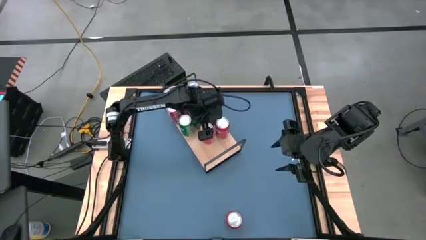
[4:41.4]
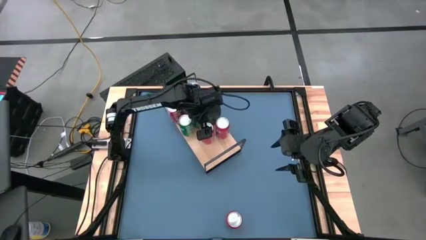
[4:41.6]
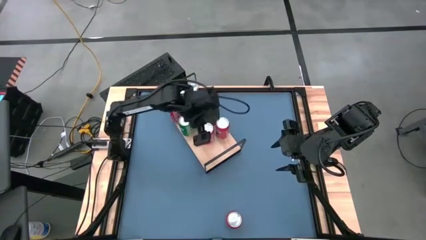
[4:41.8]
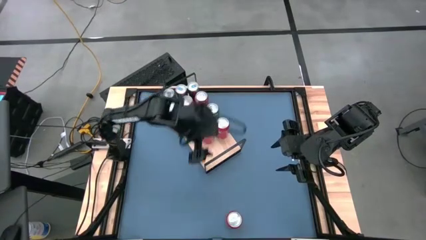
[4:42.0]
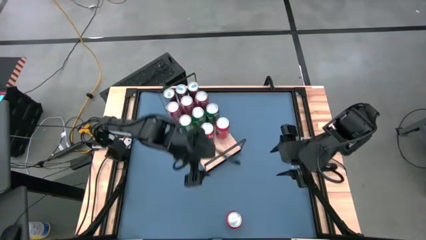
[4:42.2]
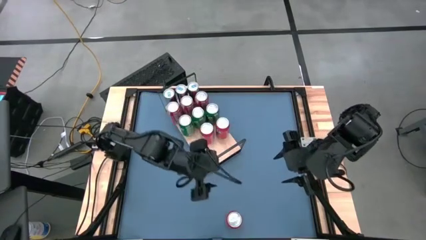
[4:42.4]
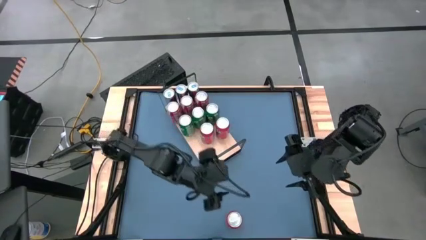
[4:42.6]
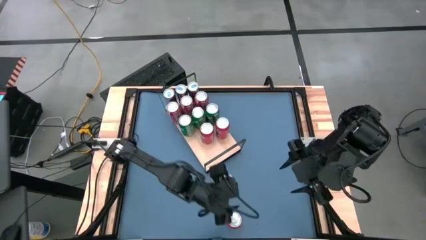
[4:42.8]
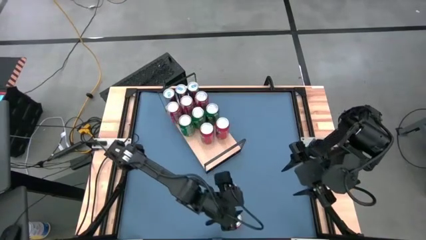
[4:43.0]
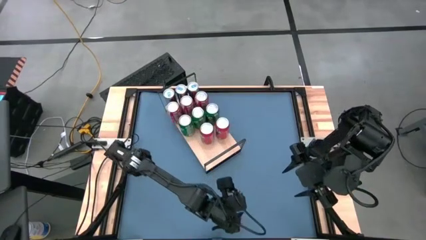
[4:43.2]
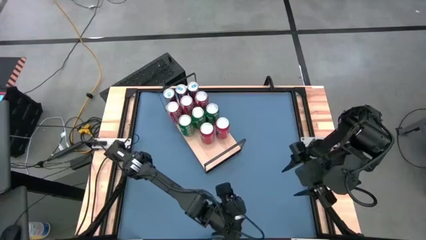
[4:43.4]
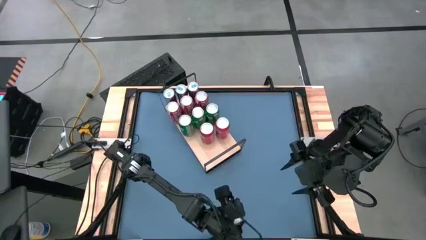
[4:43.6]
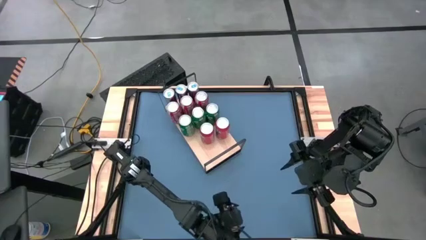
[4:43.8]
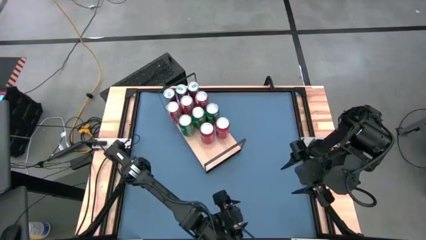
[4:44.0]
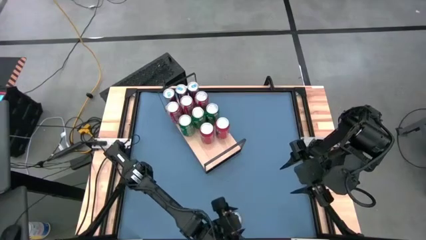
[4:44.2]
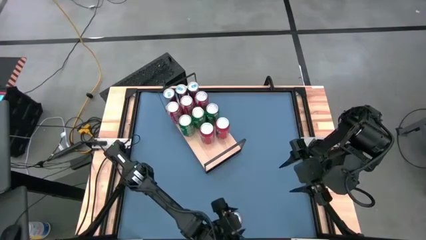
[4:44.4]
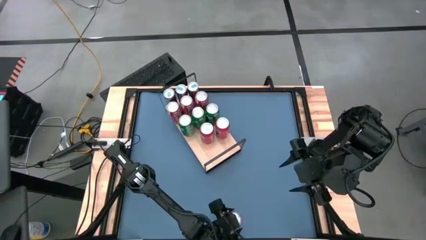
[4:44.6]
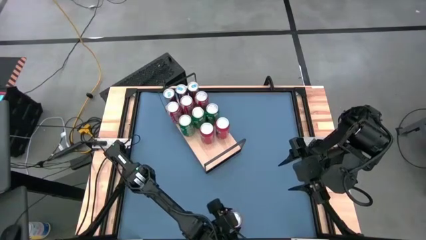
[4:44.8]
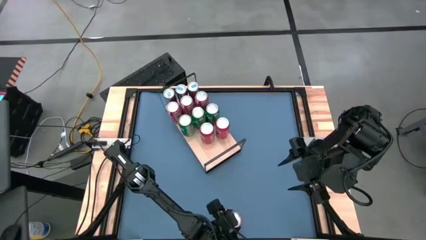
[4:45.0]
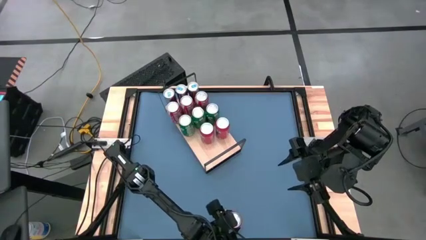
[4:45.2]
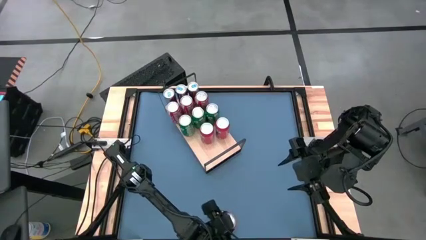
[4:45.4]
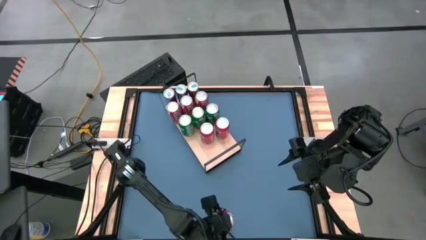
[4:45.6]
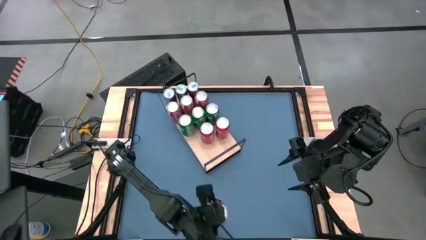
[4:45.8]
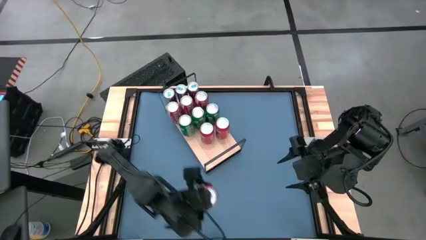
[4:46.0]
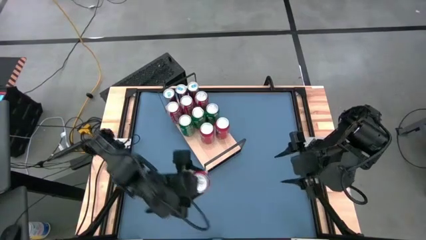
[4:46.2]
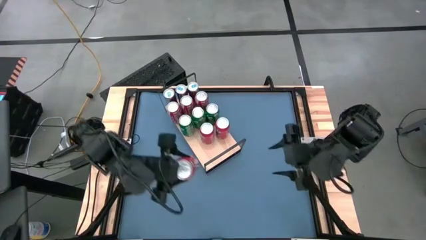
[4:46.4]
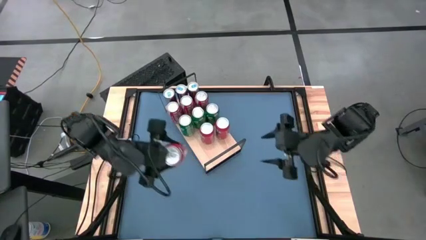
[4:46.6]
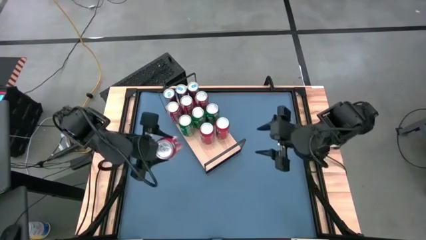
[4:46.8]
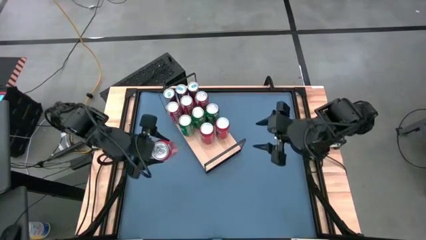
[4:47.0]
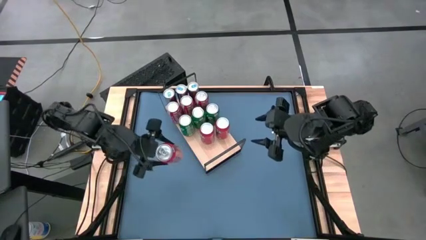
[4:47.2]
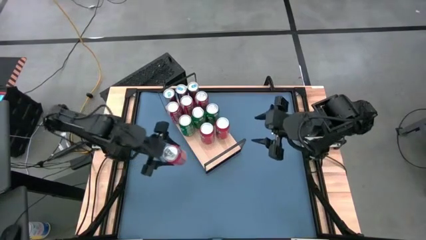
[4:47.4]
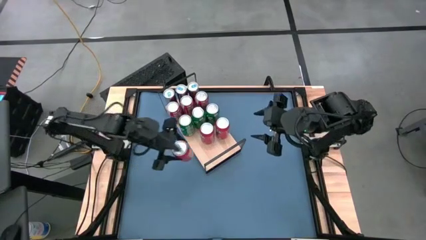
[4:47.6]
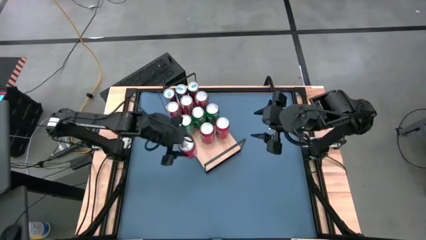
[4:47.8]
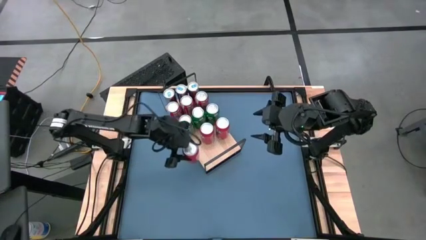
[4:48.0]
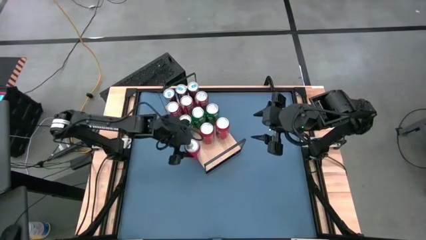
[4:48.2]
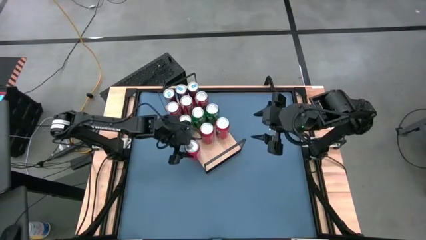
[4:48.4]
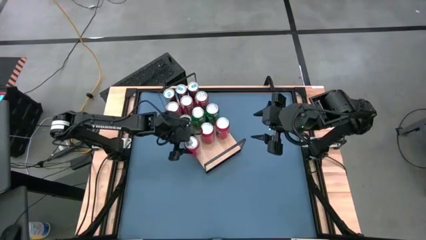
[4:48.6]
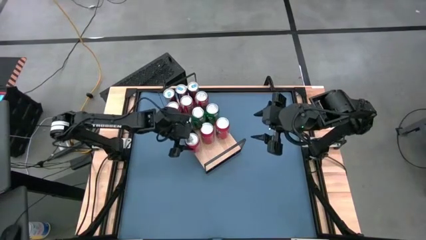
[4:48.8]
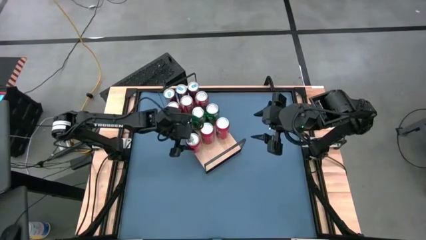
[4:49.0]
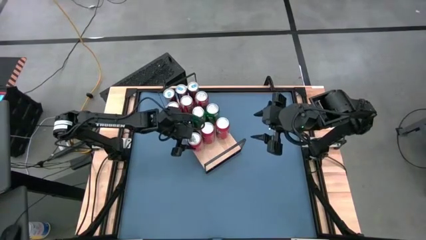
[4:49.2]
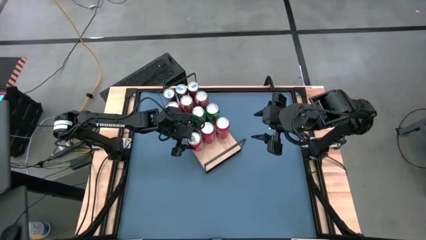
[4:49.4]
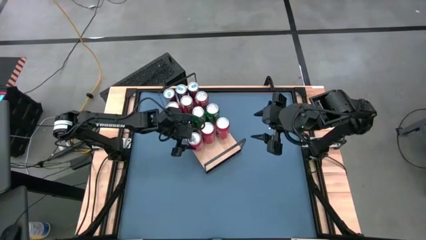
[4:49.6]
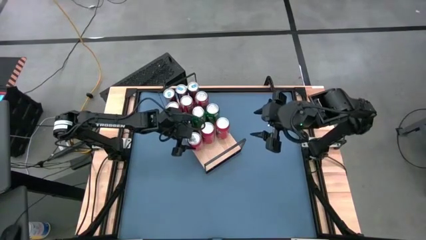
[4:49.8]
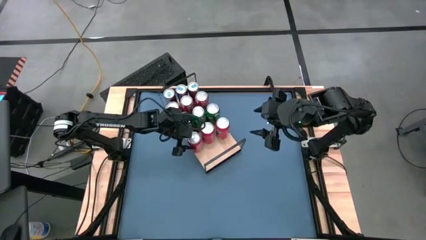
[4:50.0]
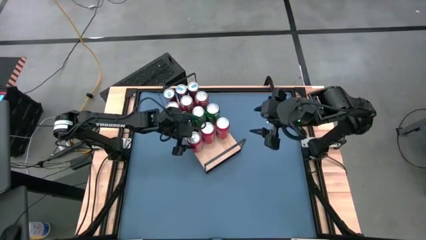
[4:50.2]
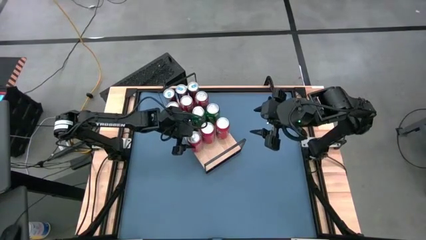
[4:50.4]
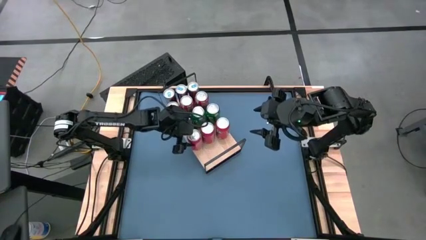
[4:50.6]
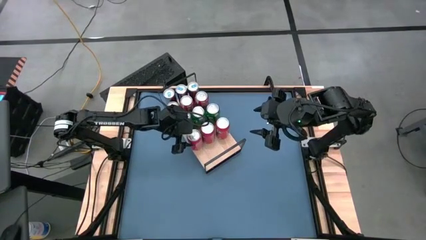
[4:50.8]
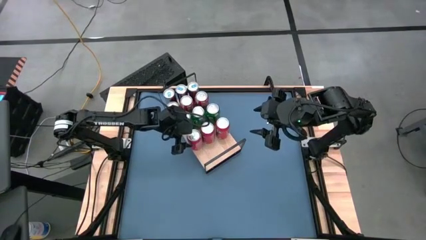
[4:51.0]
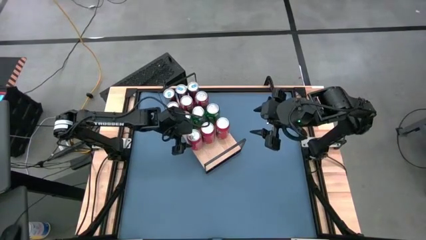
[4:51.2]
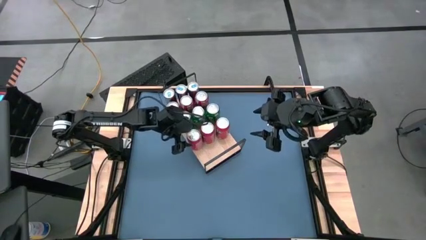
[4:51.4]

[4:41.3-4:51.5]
Task: Place canned beverage on shelf
Put the red soda can on the shelf aligned with the other red soda cans

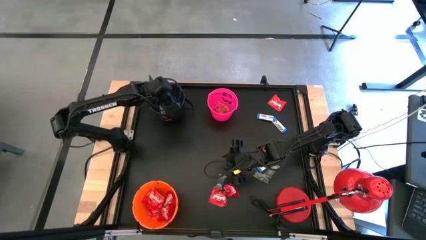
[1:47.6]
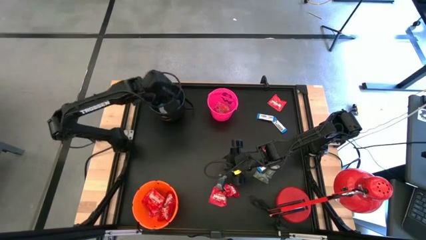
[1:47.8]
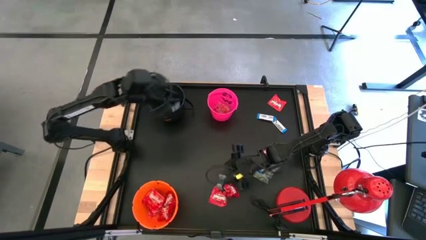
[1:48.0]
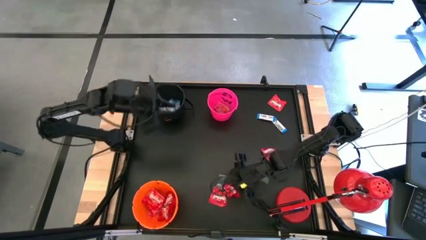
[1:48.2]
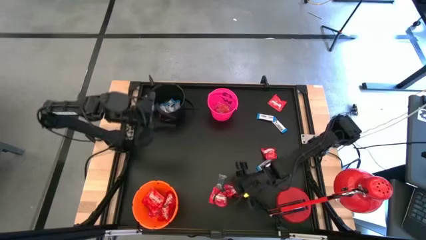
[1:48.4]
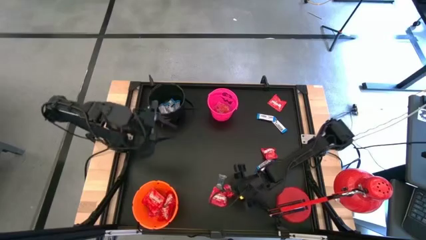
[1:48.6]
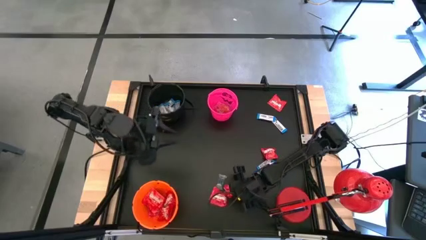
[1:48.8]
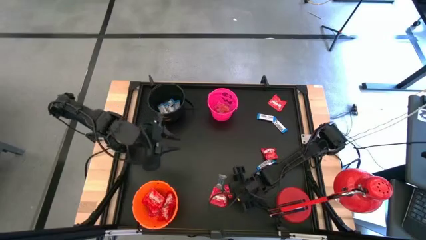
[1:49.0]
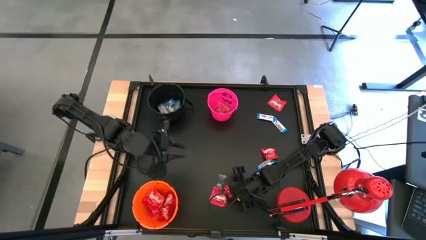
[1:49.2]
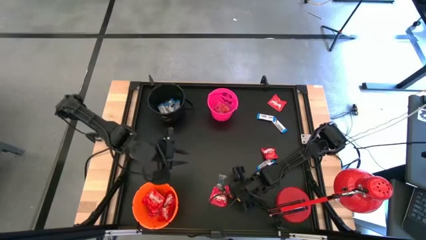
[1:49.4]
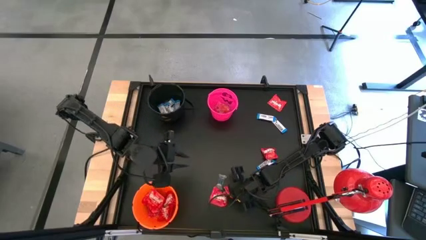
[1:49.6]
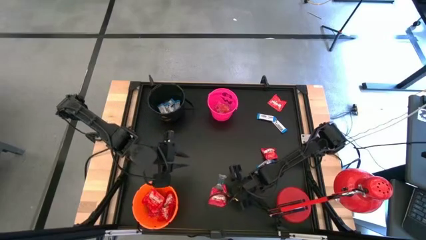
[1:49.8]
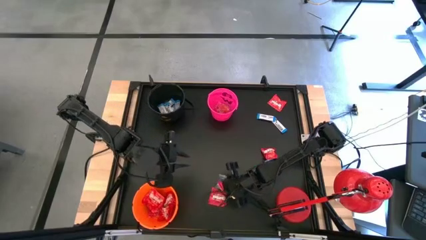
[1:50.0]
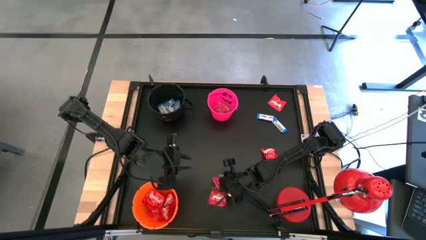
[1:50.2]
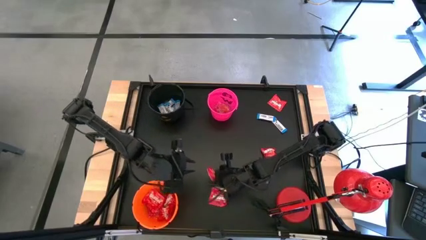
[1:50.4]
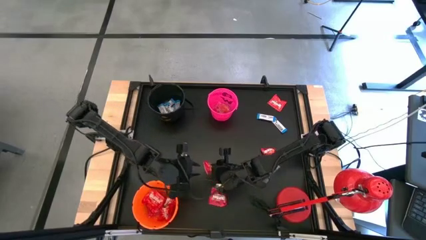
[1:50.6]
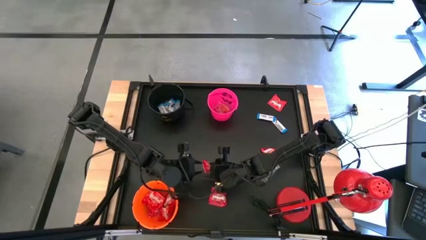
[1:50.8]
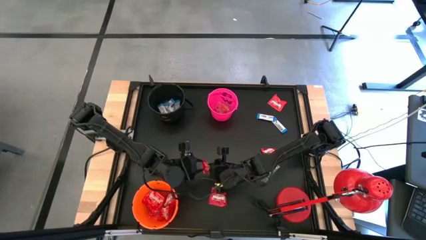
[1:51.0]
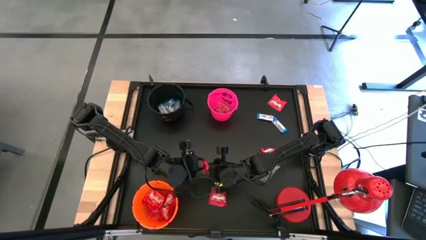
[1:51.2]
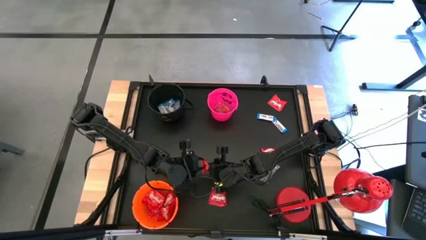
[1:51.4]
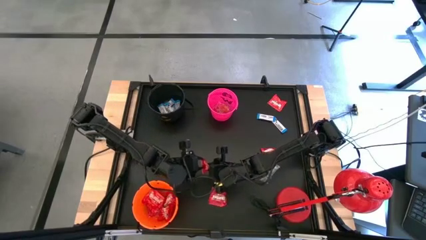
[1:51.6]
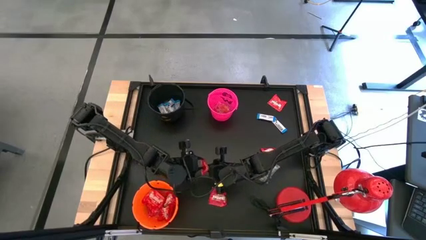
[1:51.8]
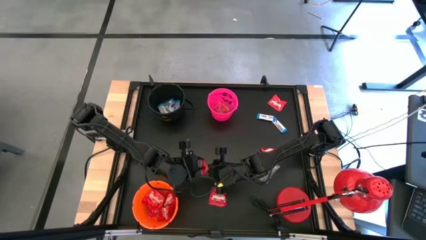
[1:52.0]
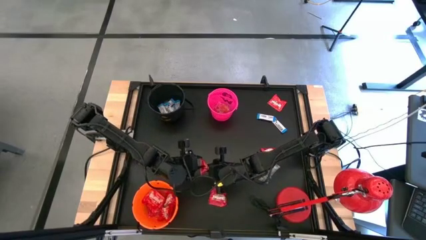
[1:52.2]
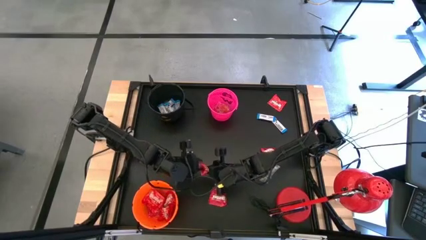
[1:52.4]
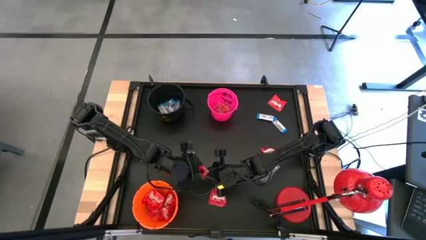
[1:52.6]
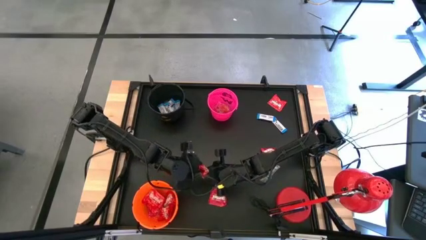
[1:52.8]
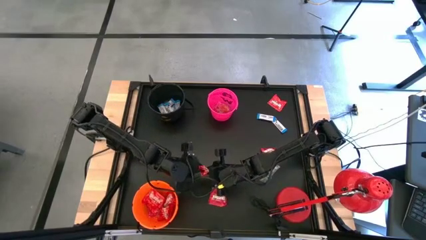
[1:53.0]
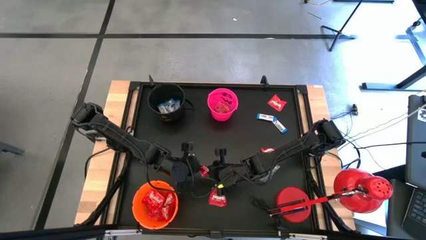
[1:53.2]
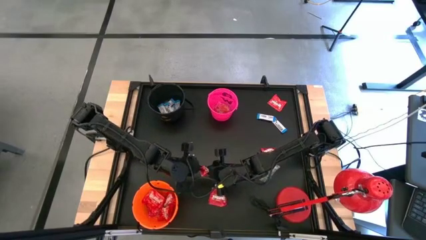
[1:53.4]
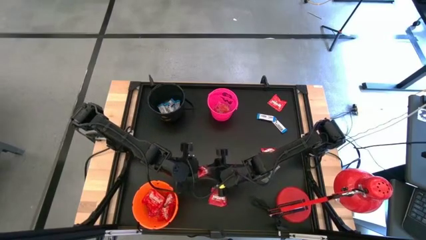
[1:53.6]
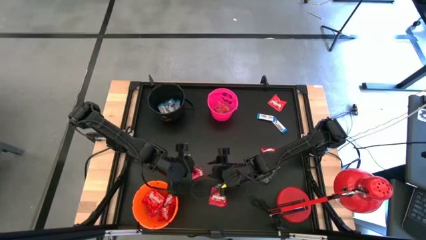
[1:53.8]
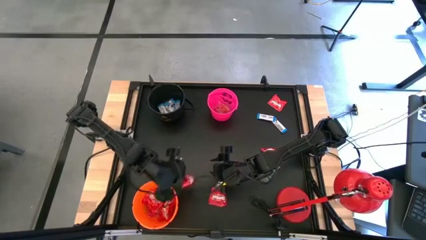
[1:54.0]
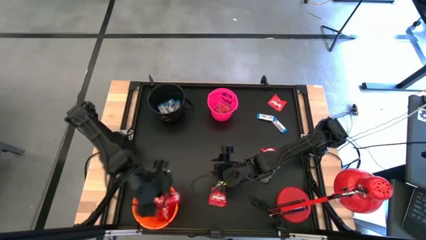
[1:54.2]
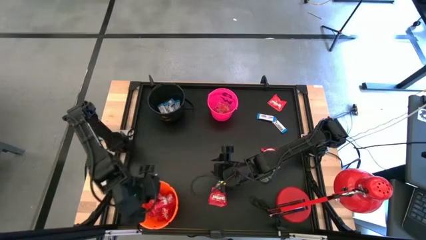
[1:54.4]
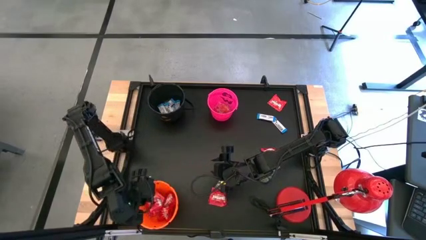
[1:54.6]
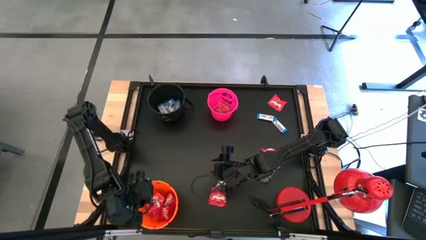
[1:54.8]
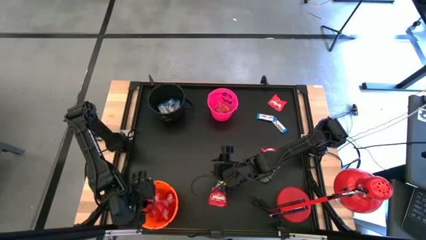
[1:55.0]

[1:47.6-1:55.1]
Task: Organize candy in baskets
Put the red candy into the orange bucket
